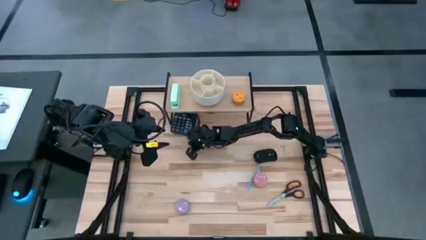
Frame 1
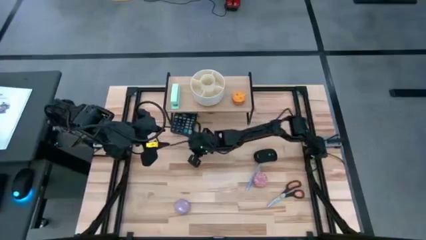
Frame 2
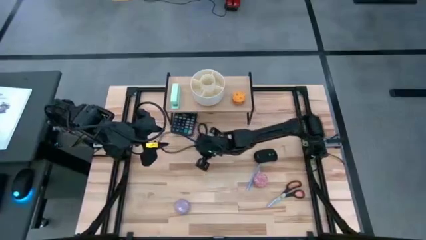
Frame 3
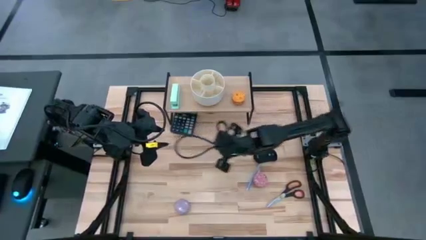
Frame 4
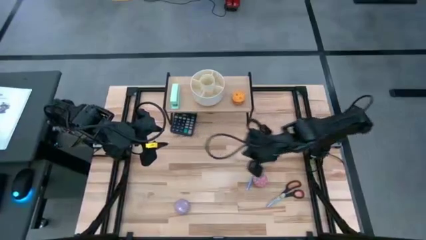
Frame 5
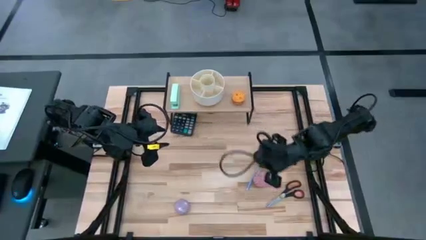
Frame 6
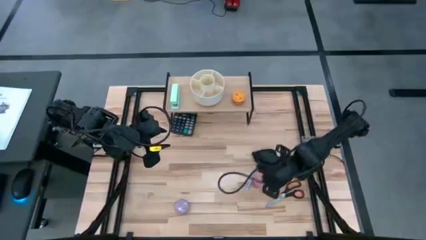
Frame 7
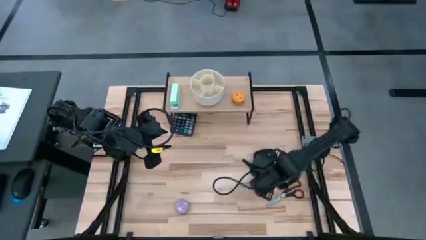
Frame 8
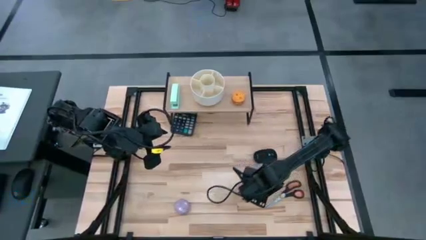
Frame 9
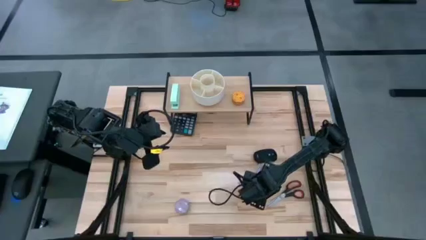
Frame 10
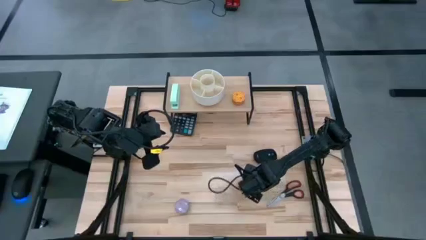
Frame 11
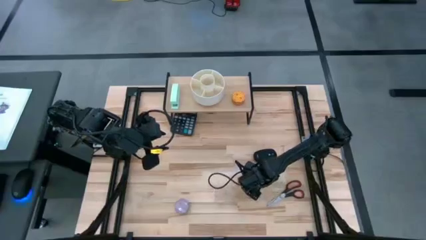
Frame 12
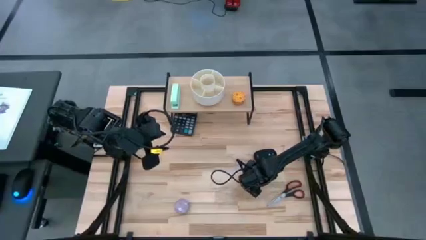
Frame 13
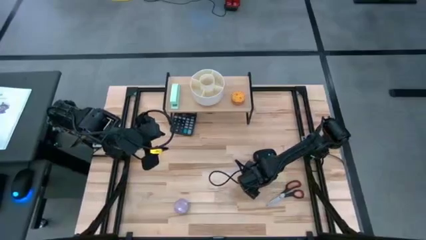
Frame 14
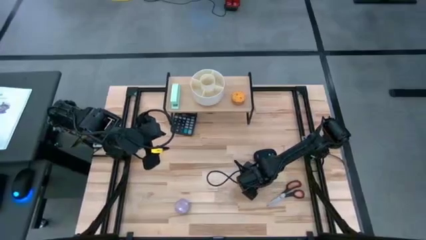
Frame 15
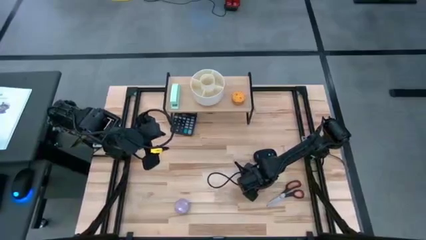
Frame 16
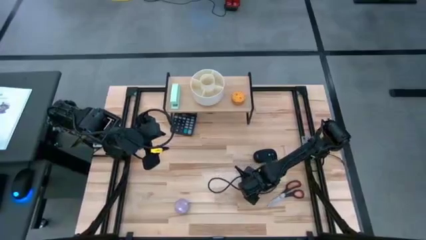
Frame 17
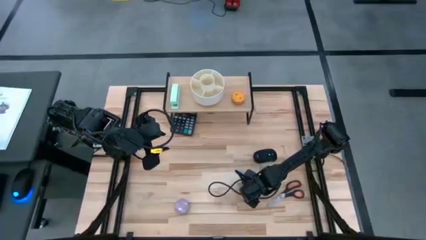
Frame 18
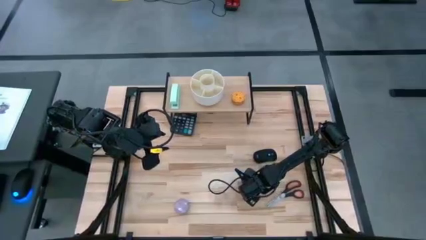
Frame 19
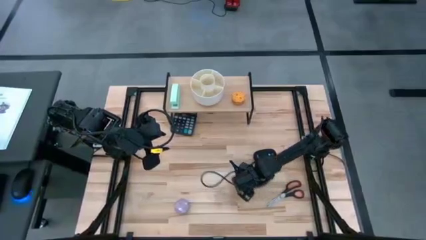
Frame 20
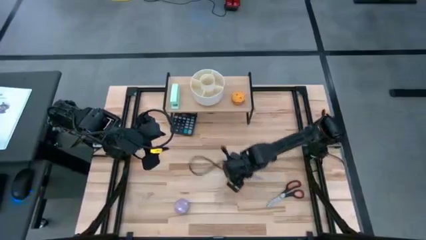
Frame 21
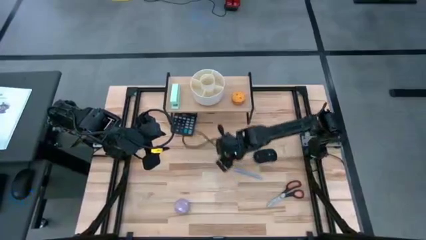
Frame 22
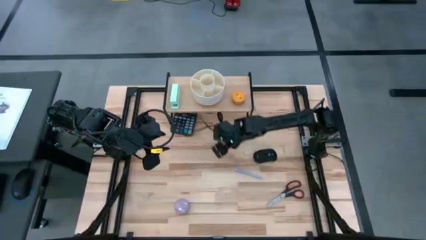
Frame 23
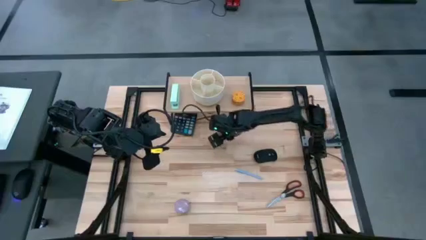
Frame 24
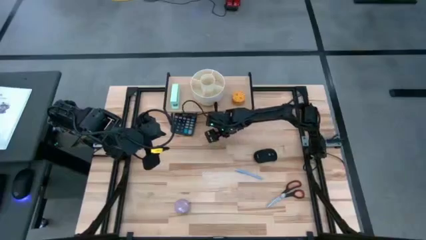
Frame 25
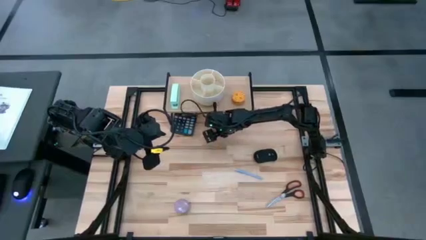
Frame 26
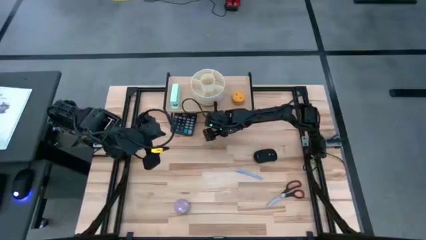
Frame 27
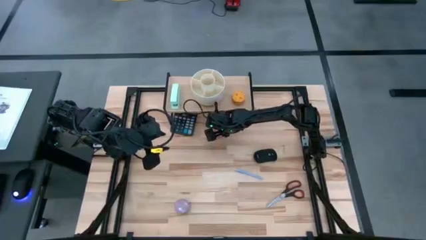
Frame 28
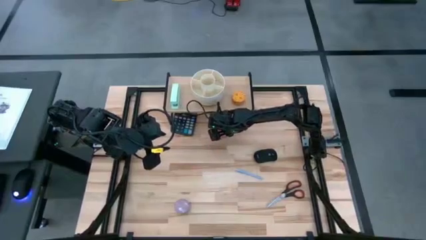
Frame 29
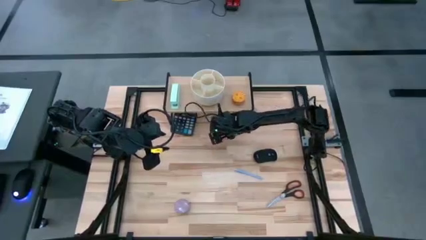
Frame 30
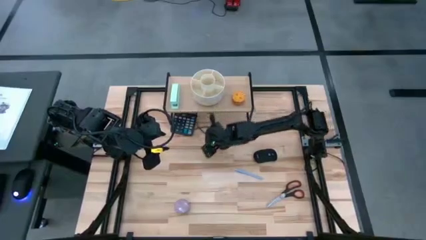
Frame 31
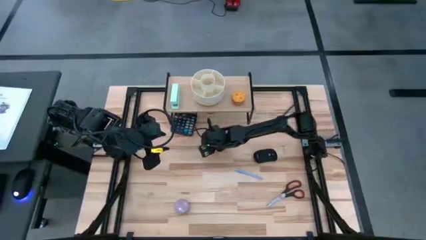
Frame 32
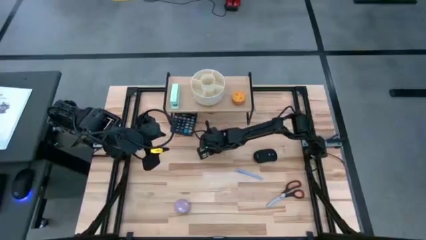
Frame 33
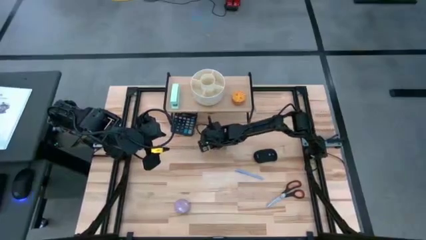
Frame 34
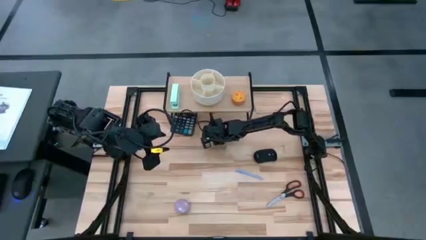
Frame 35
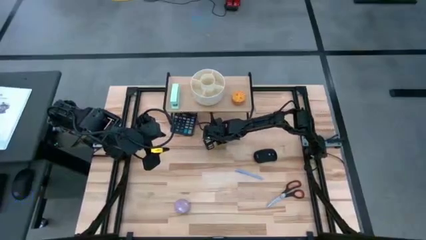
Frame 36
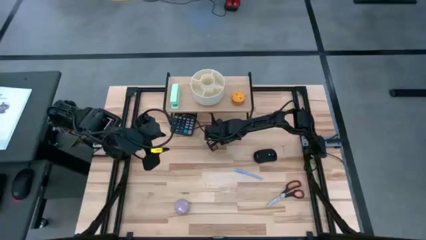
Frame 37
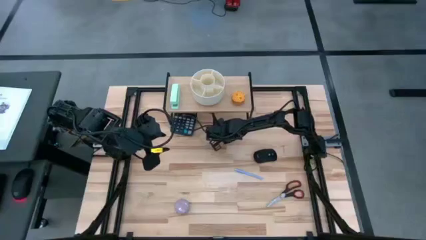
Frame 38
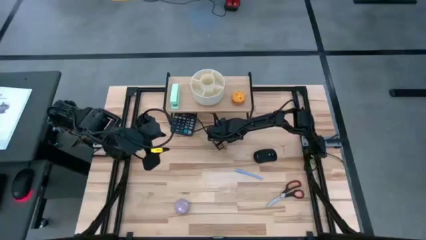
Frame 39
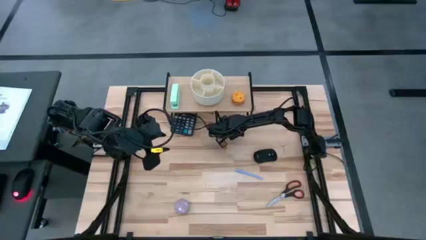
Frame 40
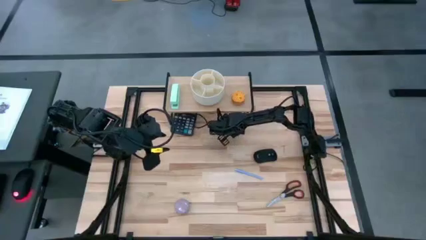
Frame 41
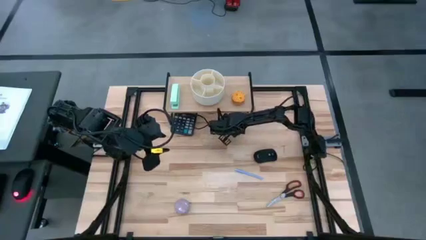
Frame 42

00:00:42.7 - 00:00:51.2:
Task: Stock shelves
Put the red scented candle under the shelf

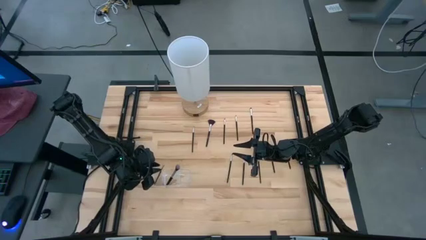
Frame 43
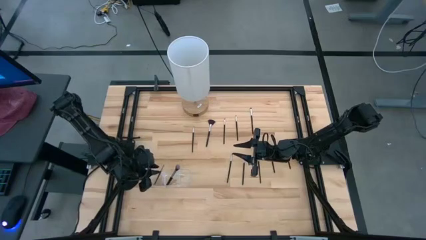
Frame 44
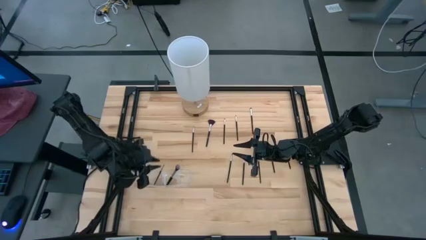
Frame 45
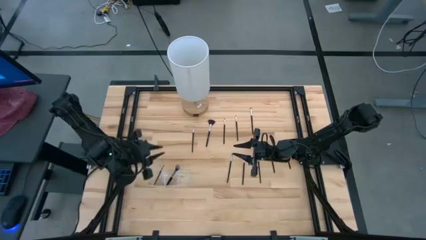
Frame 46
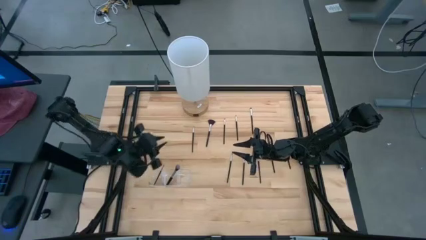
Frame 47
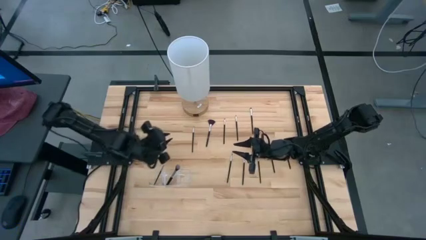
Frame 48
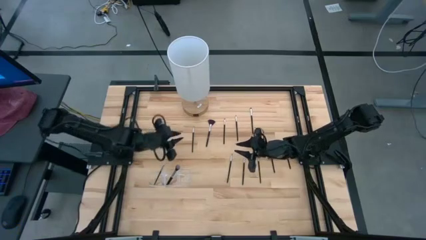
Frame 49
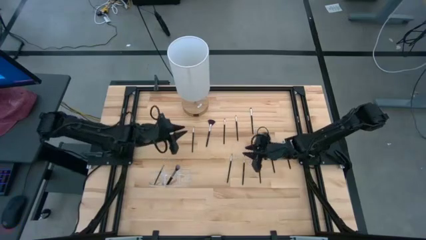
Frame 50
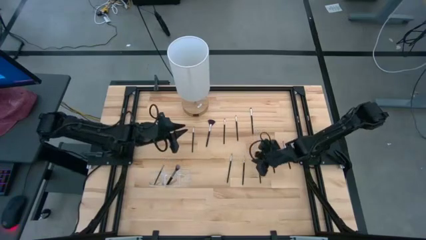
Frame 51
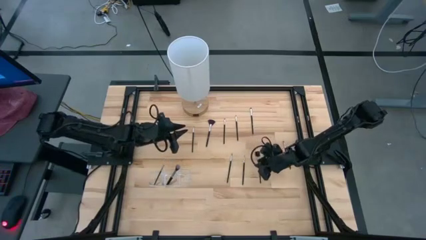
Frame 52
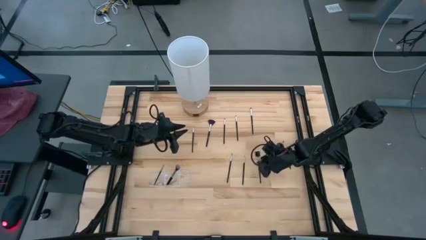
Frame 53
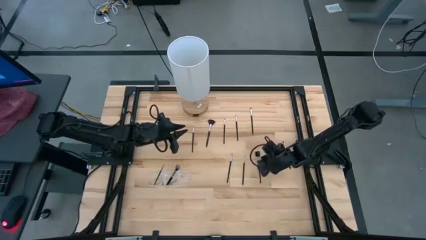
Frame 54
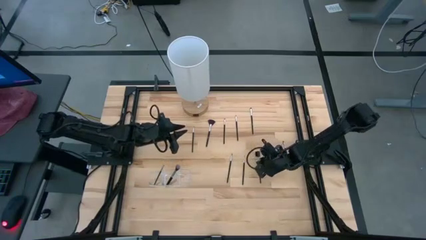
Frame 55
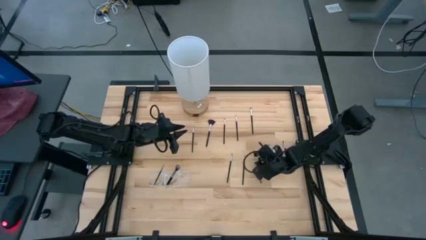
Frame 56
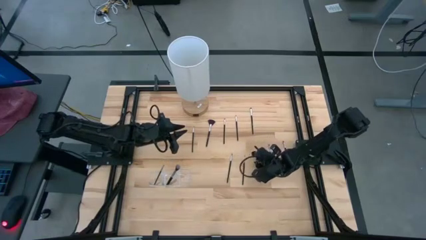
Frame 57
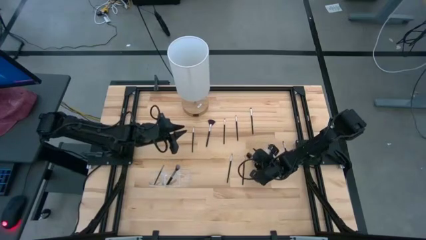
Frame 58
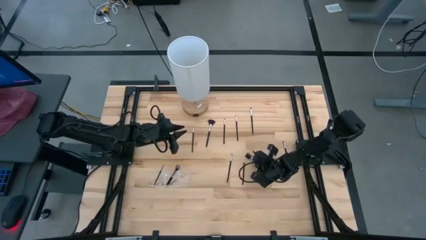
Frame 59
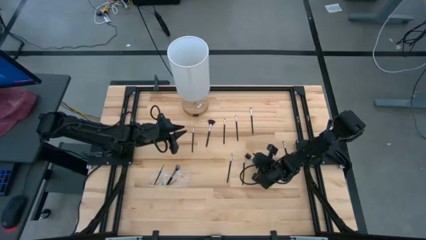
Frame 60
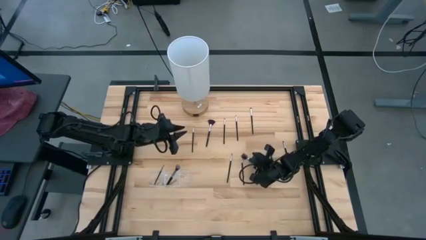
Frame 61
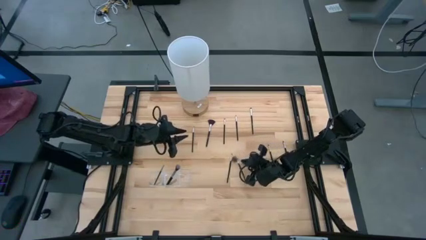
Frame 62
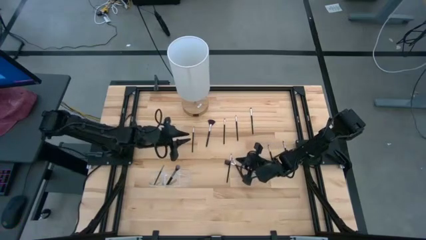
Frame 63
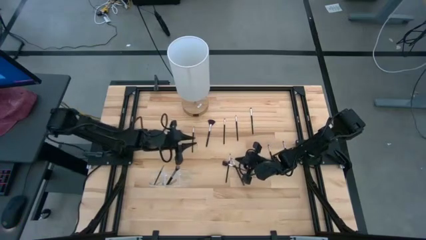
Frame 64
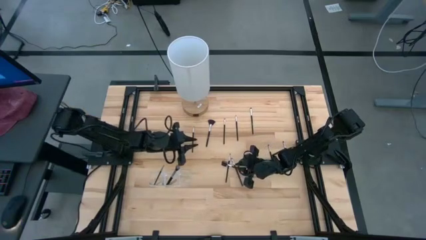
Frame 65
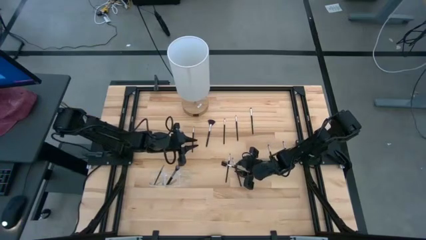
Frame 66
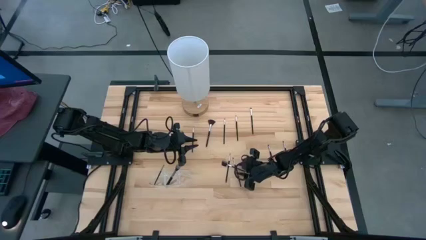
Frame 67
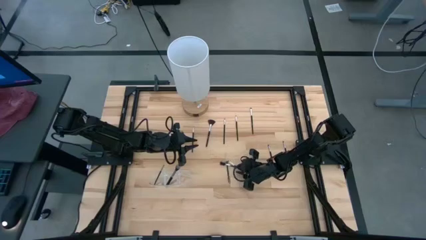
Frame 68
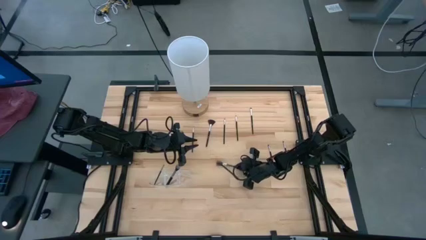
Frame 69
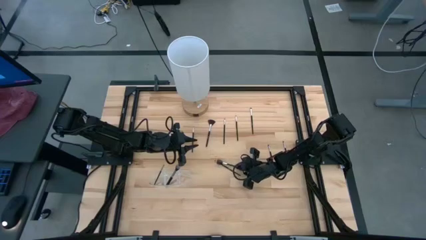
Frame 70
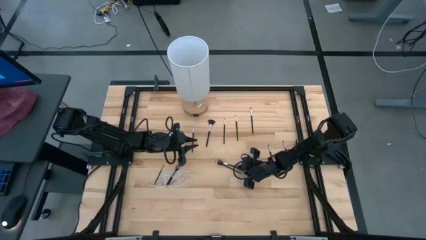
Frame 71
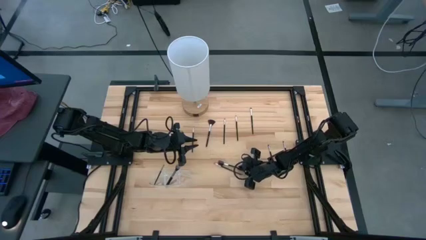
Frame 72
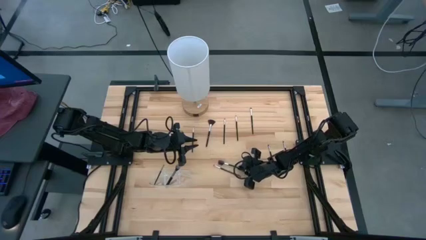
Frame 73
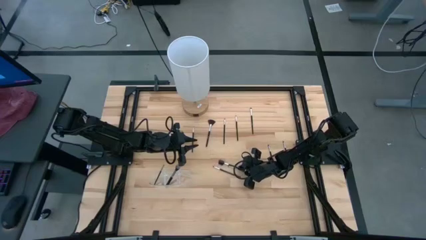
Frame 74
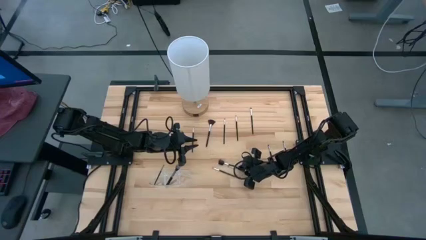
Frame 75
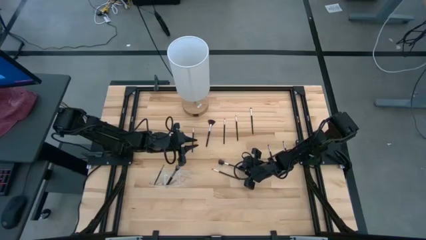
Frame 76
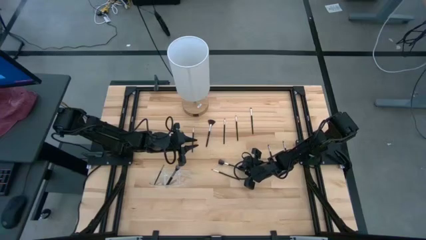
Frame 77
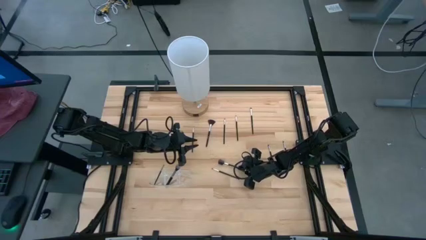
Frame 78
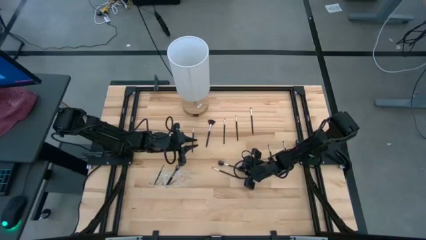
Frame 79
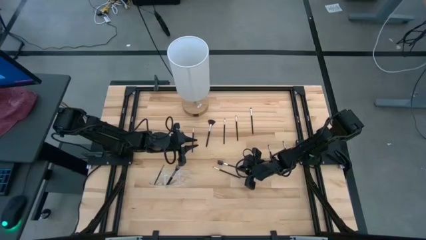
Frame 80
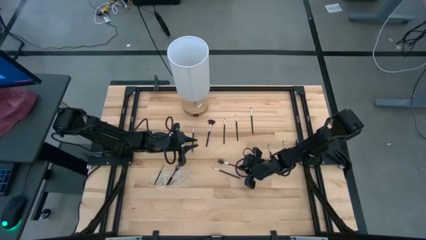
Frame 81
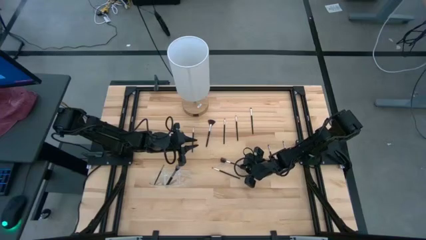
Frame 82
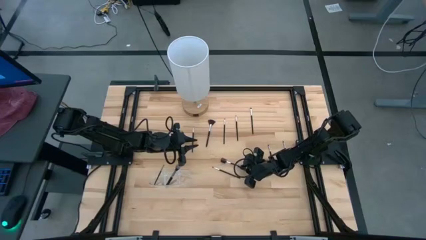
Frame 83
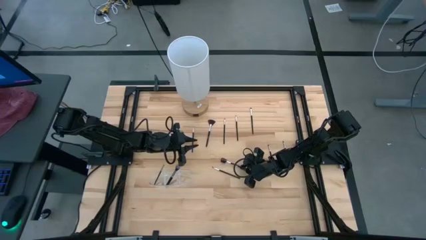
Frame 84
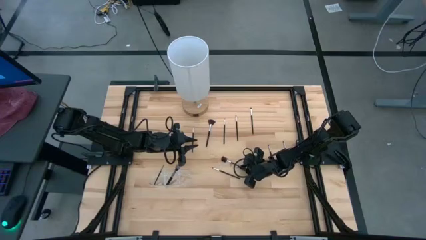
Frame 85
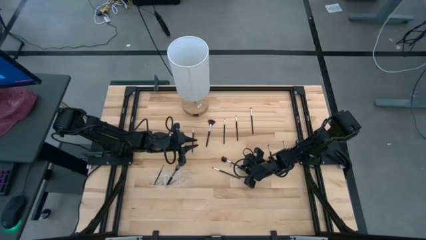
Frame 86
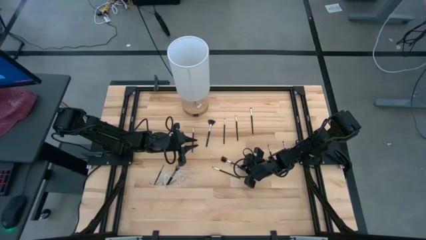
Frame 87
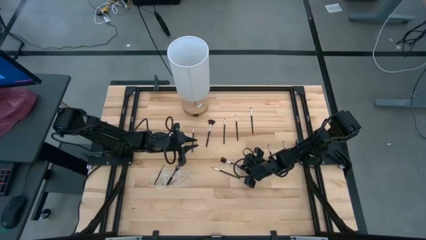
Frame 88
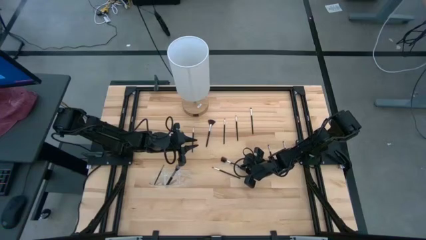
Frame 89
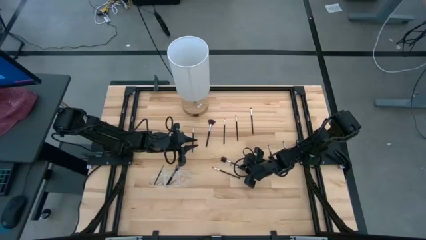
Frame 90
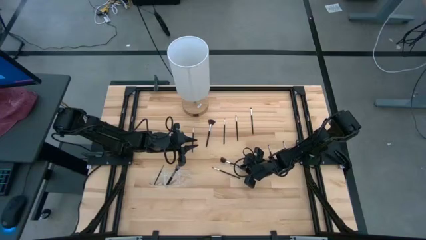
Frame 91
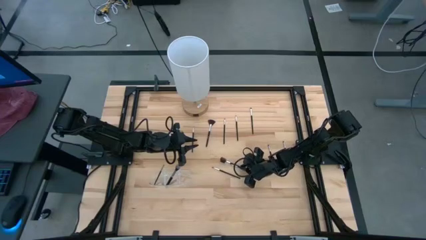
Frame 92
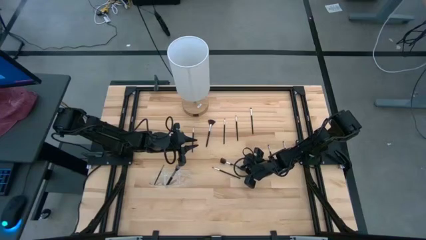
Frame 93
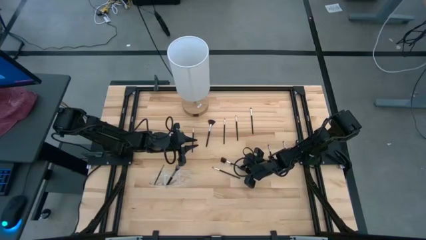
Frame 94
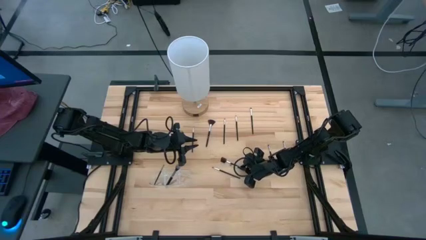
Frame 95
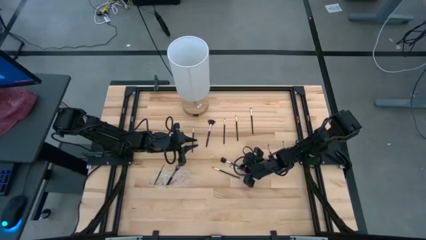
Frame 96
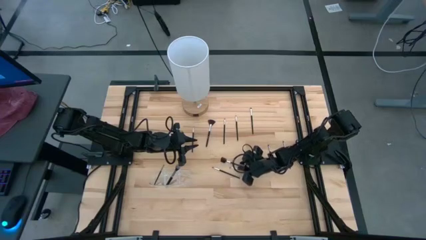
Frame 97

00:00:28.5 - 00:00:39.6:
Task: Put items in baskets/containers
Put the brow brush in the transparent organizer
